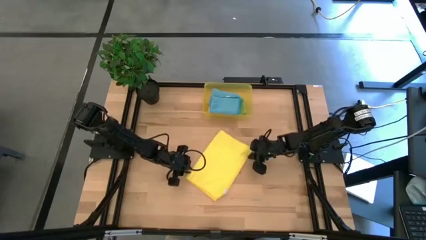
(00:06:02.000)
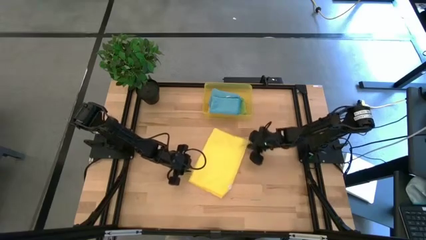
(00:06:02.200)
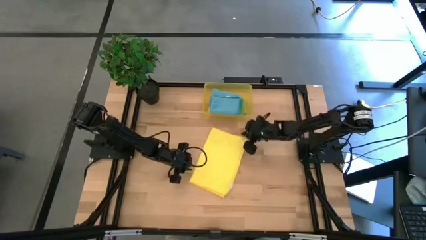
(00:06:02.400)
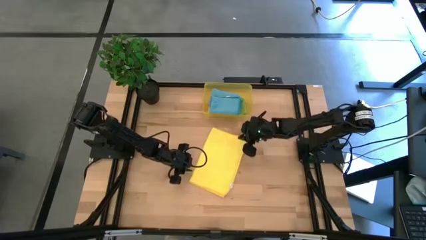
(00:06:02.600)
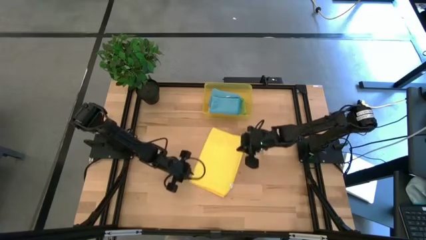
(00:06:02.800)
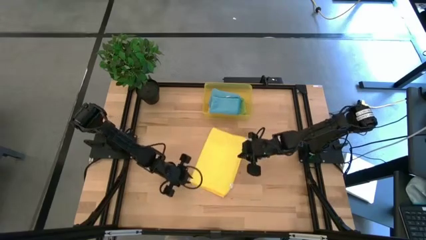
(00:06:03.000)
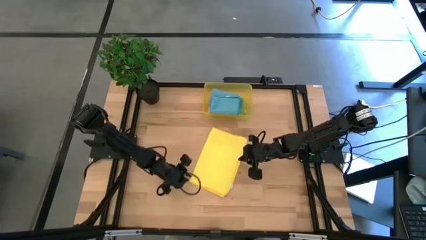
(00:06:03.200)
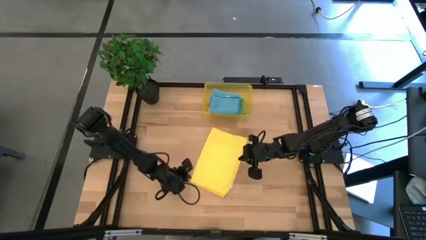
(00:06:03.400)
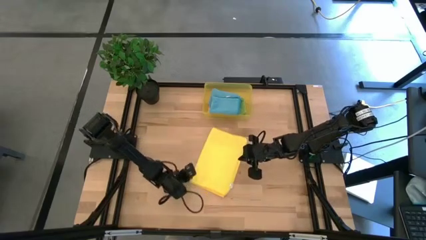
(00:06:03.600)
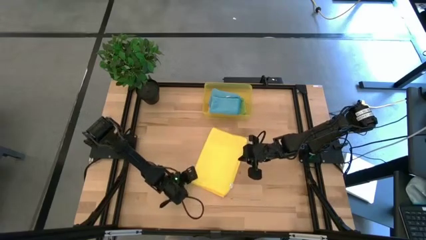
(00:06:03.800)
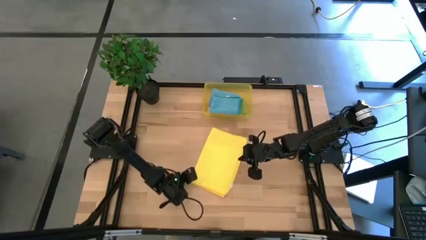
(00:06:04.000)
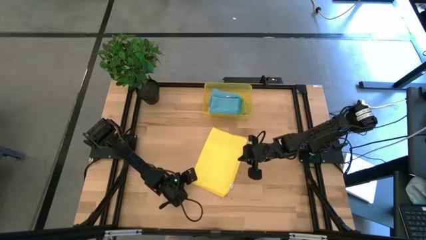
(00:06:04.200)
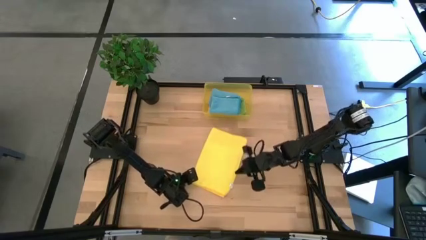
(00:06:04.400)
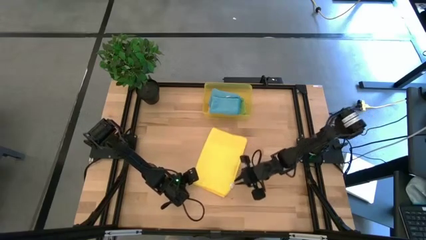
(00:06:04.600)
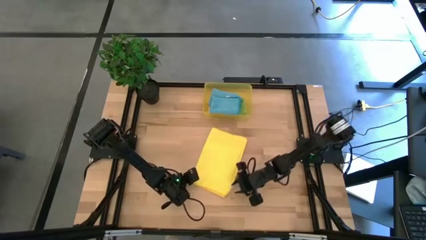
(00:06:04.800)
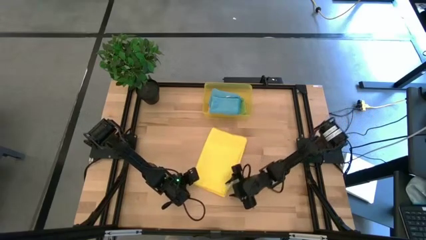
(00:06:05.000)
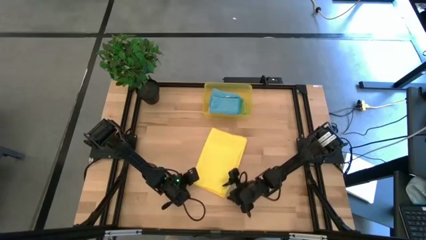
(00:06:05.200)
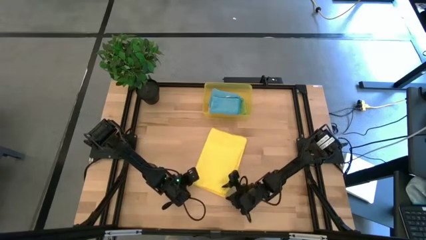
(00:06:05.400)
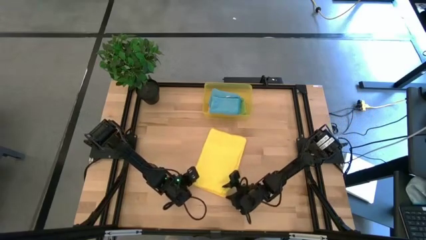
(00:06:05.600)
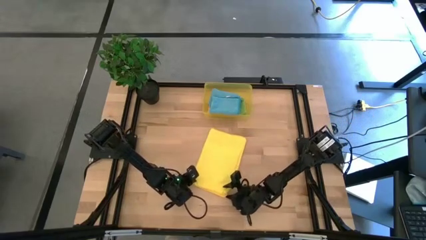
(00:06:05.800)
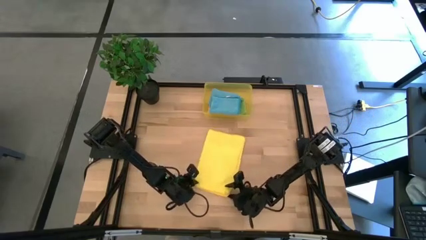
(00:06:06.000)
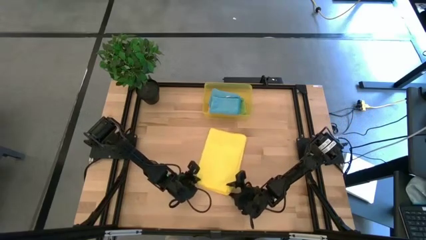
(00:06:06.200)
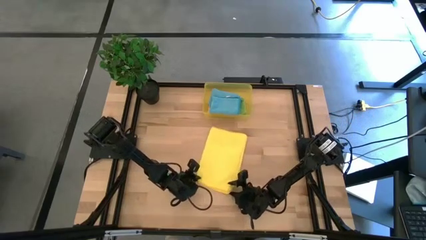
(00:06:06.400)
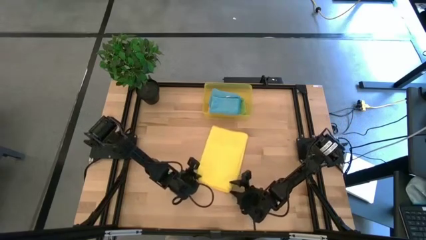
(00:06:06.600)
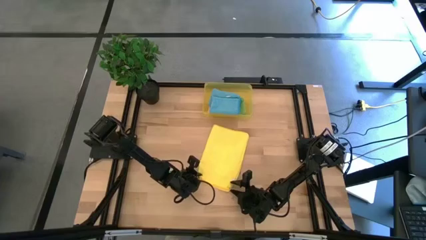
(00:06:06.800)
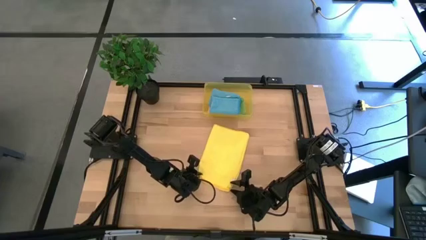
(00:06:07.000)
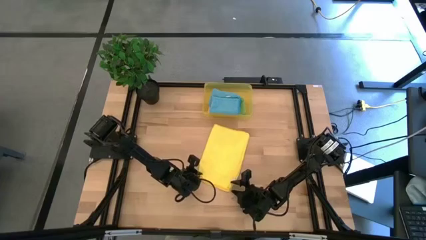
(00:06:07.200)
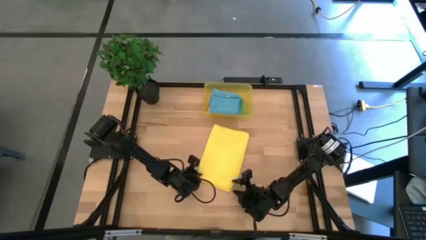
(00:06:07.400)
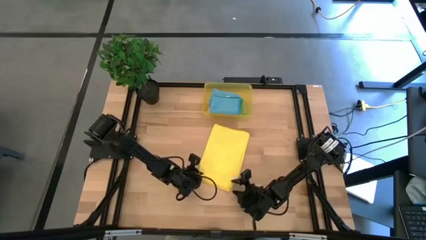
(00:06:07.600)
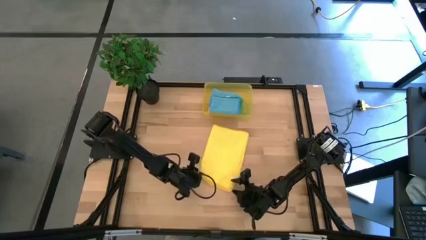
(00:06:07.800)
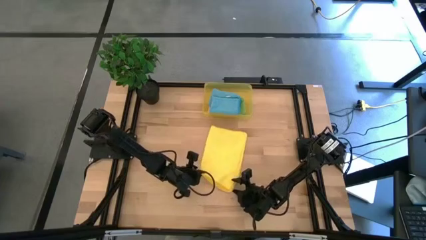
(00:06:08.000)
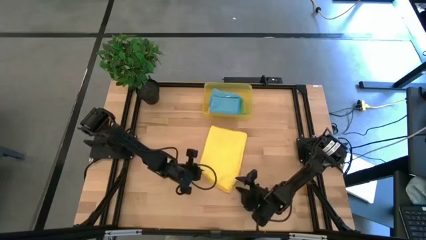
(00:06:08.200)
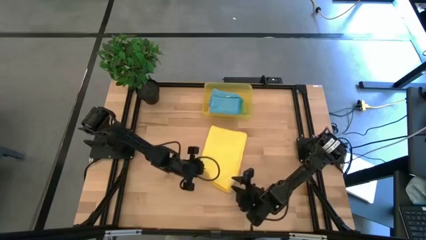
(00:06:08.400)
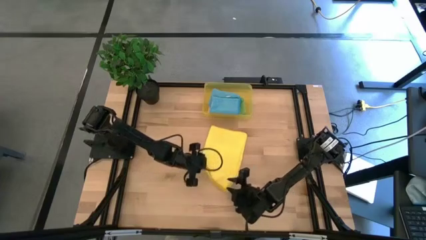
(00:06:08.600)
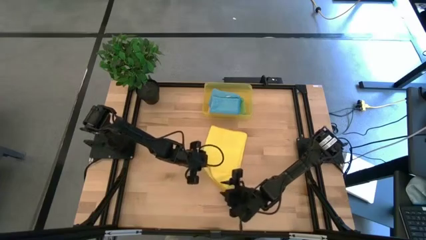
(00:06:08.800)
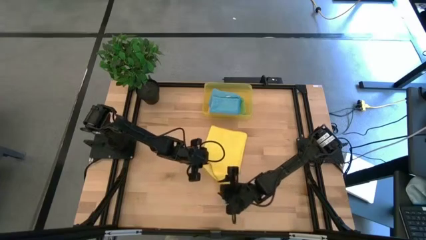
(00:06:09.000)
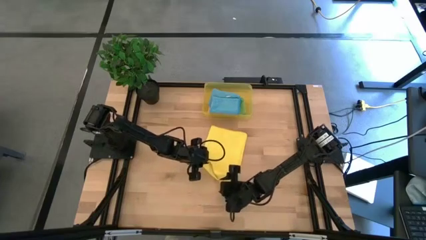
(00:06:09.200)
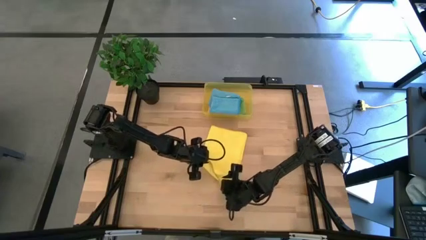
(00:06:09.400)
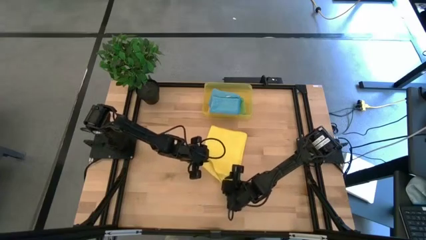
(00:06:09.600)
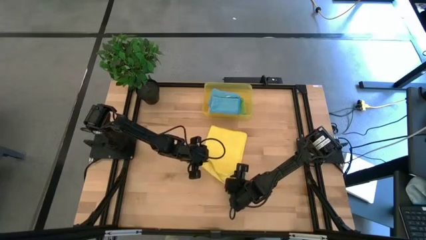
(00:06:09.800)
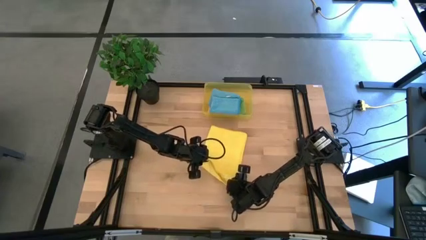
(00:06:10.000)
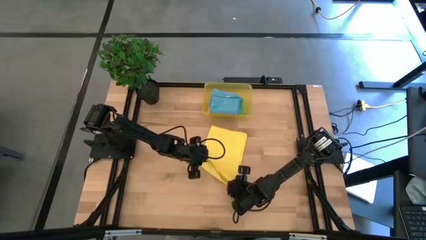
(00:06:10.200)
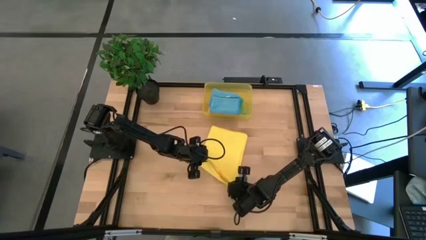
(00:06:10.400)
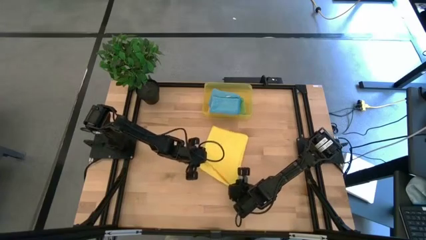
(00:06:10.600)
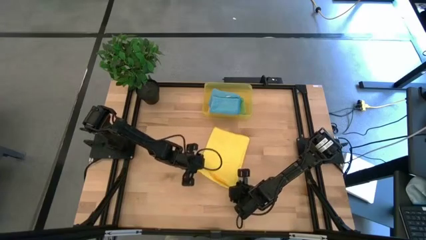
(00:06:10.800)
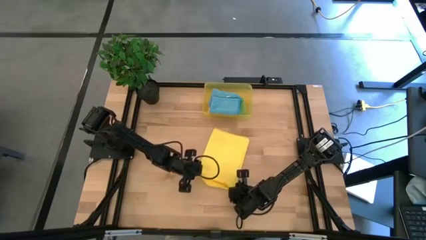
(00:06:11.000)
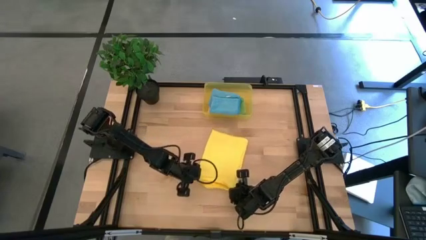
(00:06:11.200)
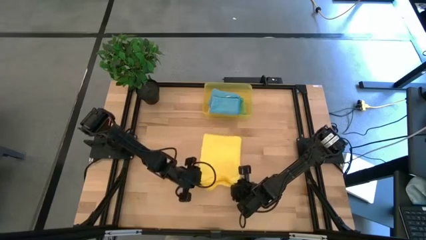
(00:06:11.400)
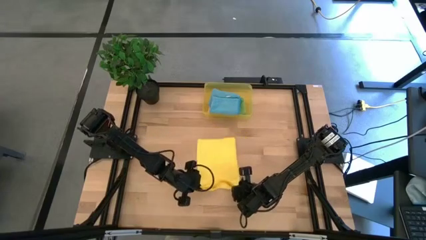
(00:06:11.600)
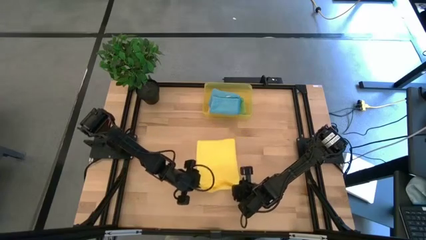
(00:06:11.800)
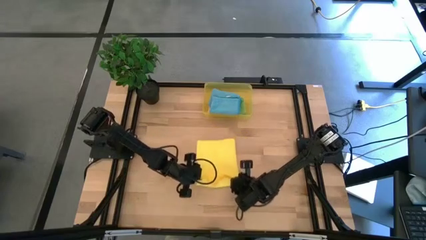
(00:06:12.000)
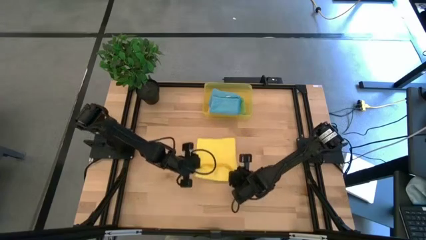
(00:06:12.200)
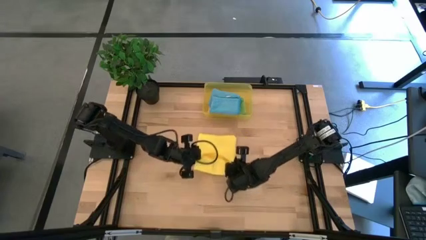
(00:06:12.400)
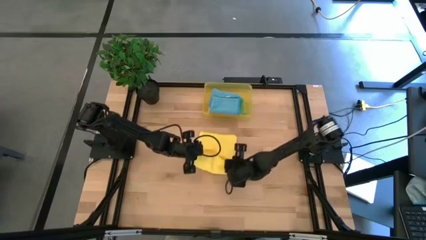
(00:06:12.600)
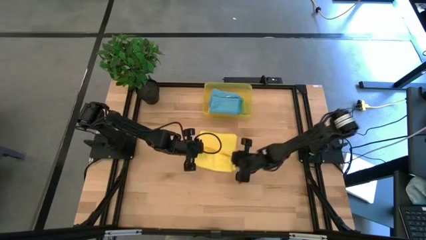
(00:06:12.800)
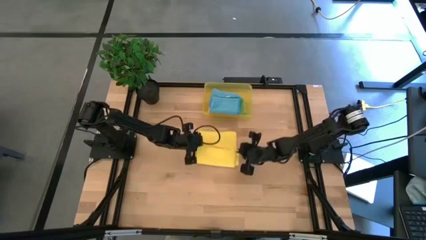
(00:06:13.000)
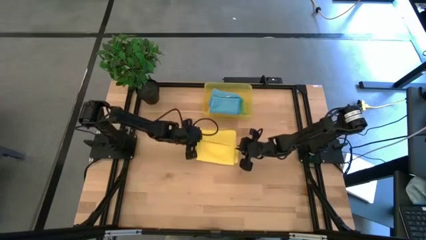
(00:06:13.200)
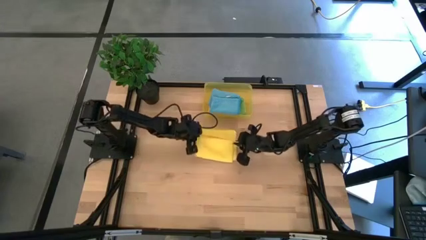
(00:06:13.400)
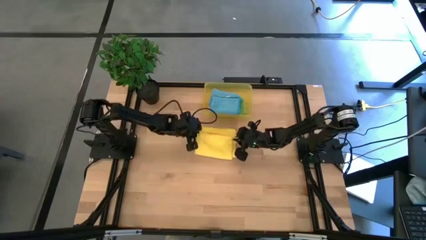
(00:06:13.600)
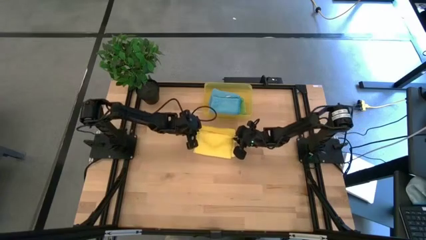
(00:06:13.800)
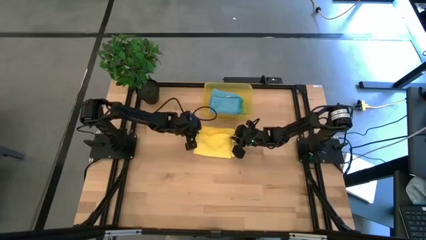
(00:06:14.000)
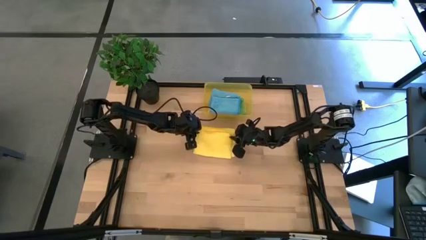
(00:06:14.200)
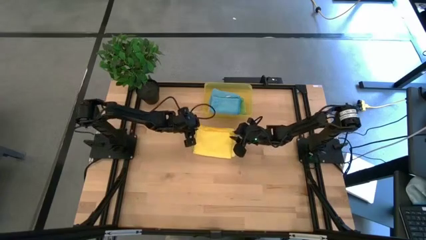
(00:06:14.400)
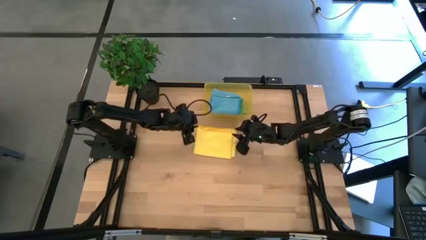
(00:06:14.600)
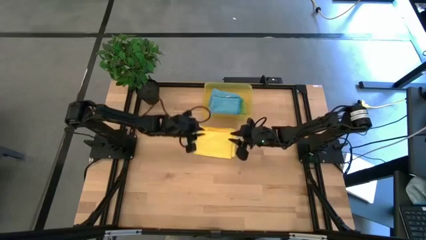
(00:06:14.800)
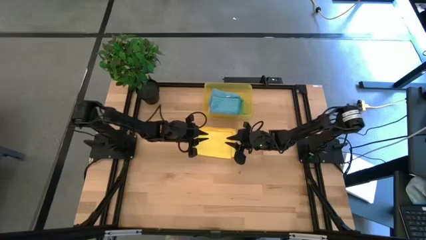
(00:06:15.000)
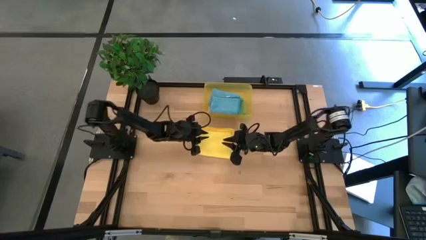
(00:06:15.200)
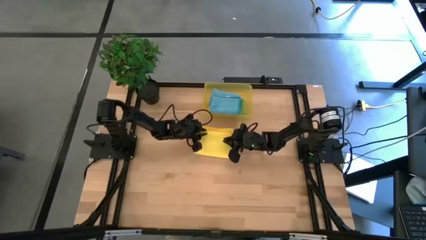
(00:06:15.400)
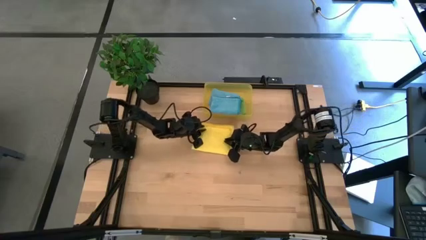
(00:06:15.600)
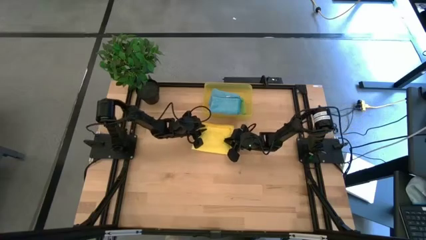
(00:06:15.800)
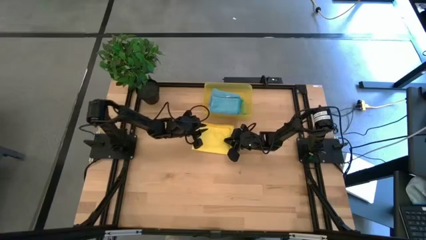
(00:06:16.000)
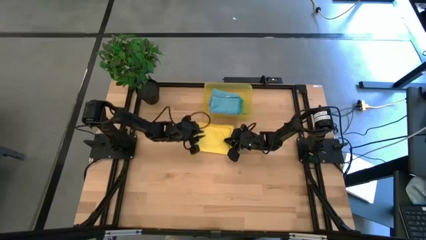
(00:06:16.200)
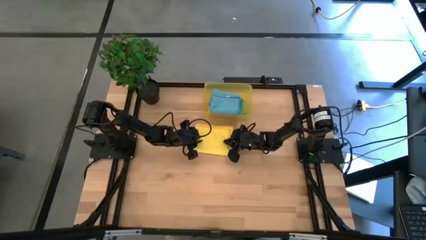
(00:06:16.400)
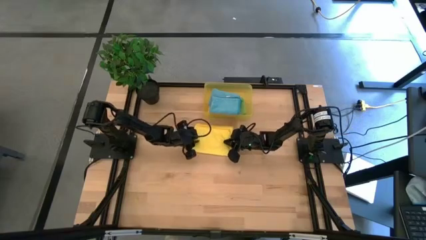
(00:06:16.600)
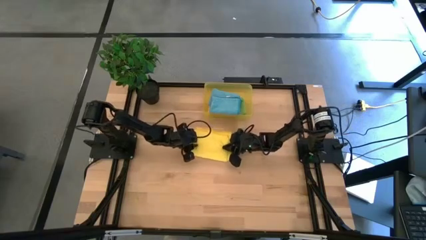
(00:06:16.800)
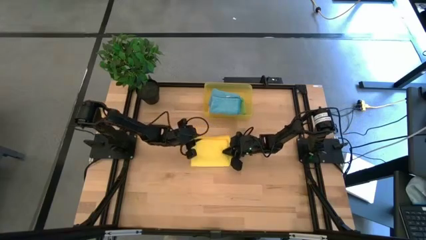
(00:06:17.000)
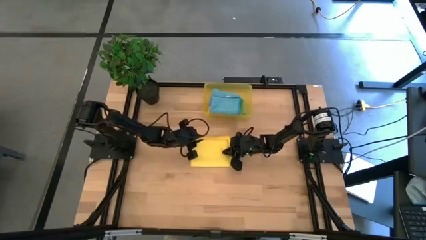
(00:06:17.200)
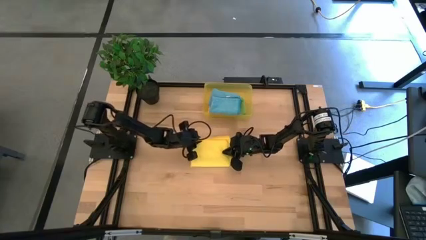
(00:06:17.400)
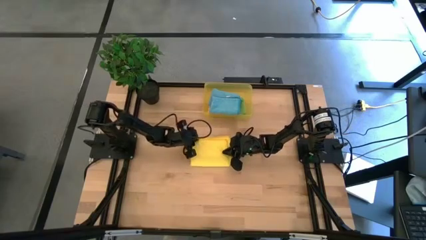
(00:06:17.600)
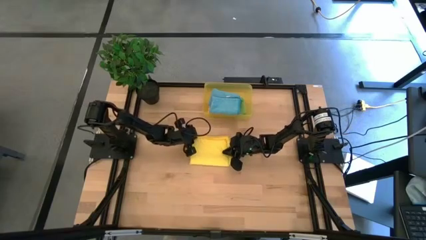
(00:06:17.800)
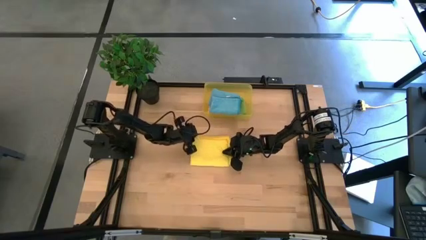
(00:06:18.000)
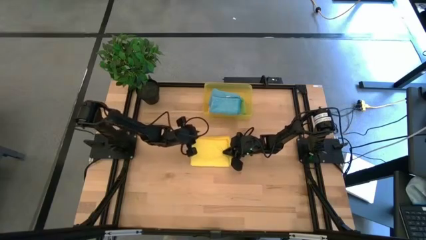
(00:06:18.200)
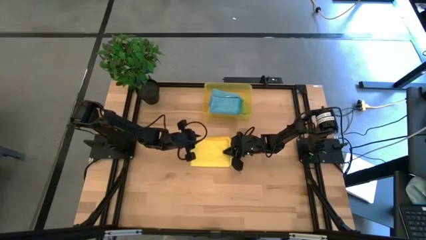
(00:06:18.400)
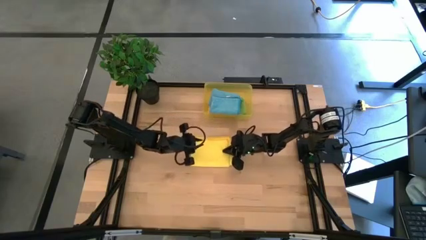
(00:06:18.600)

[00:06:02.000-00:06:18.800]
Task: Fold microfiber towels
Fold the yellow microfiber cloth
